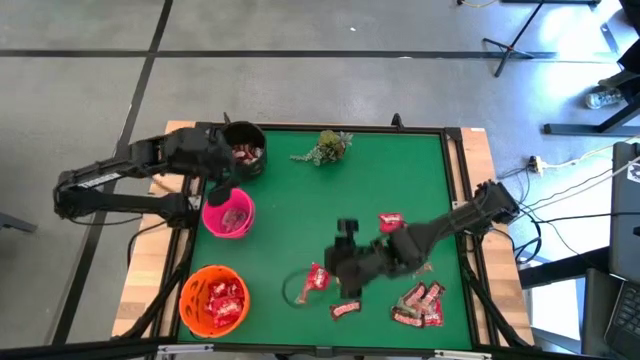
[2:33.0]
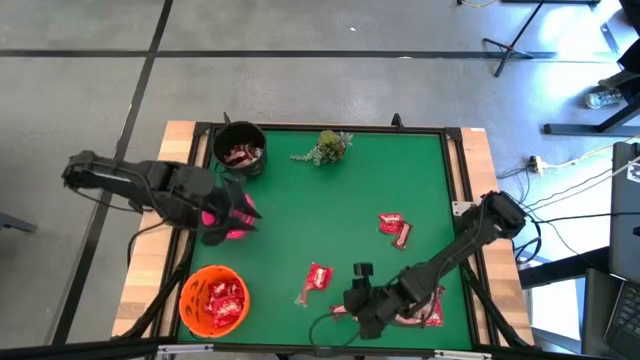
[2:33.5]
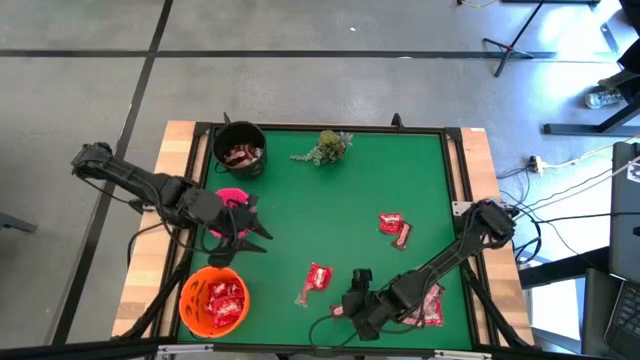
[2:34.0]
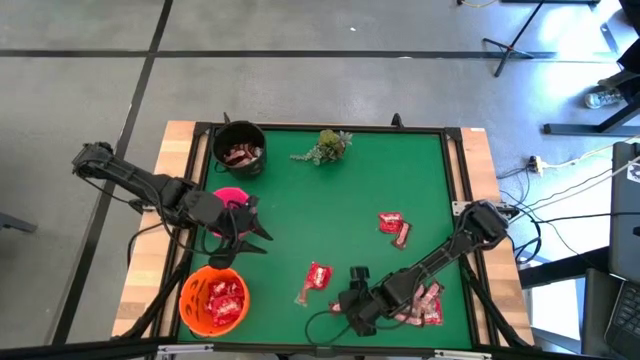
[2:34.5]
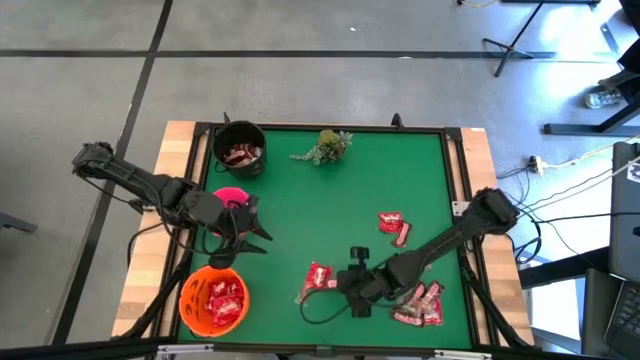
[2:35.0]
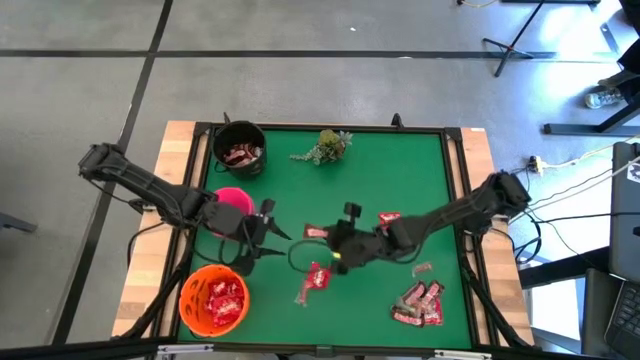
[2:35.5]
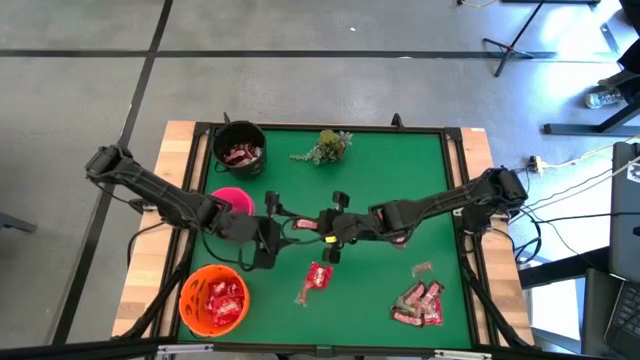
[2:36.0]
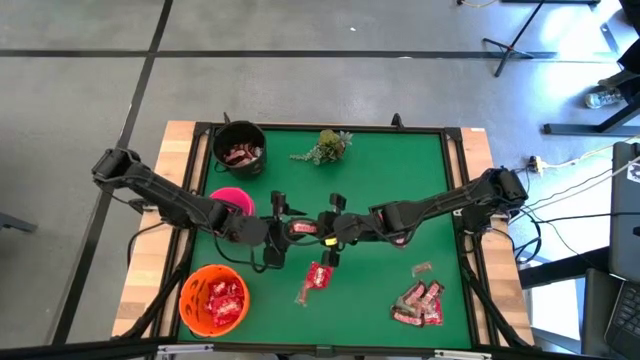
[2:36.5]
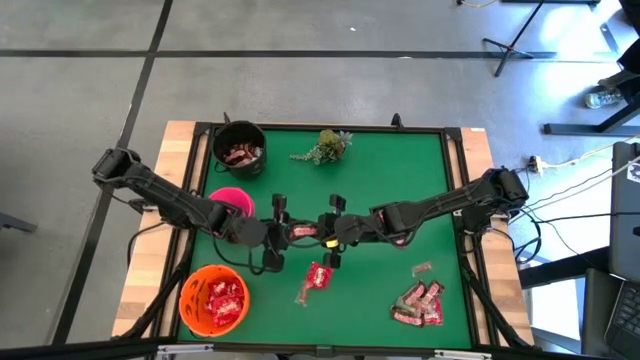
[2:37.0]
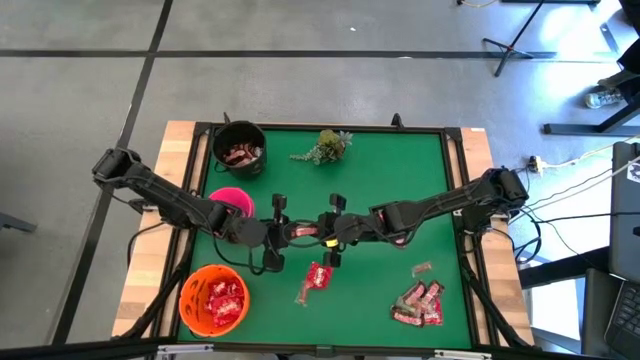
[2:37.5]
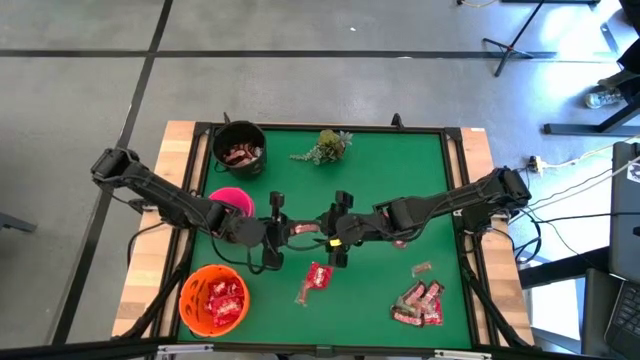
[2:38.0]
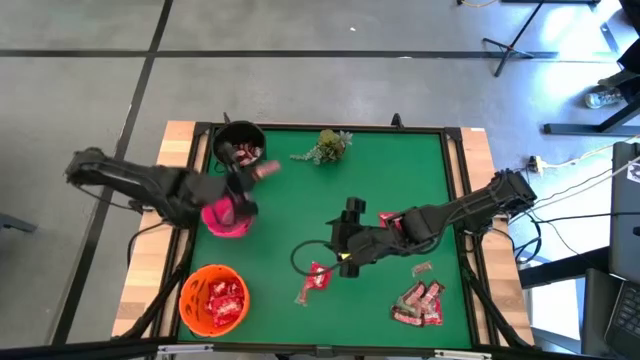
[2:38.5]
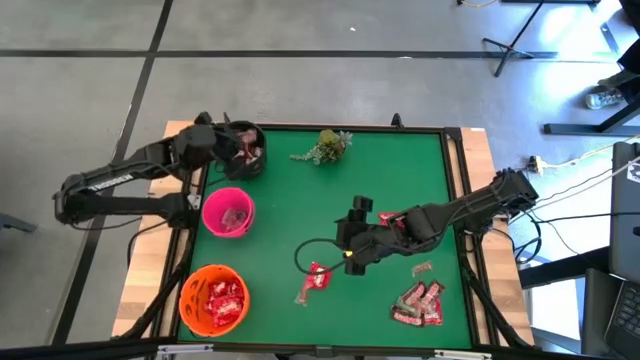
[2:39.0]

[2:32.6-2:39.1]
Task: Sort candy
Put the brown chocolate into the black bucket

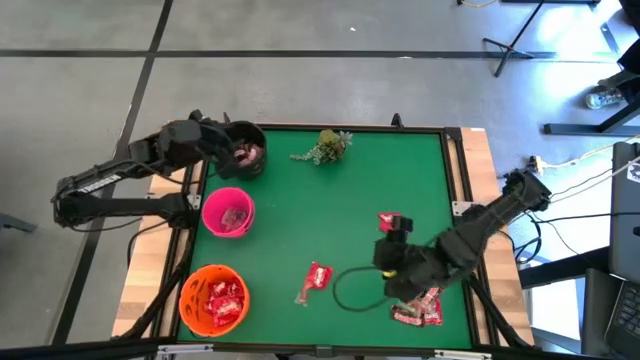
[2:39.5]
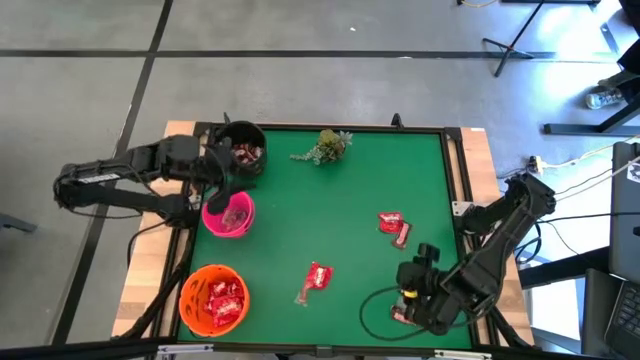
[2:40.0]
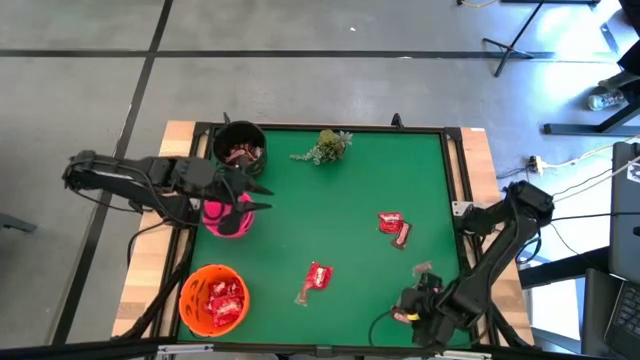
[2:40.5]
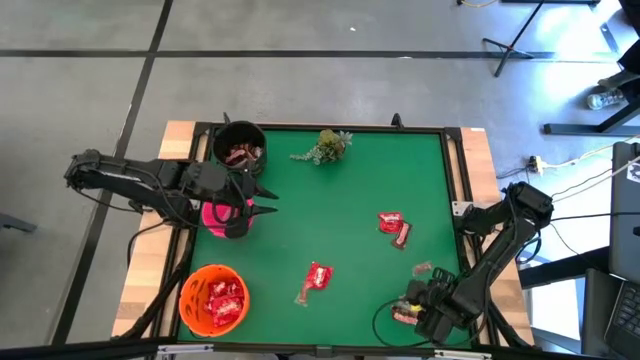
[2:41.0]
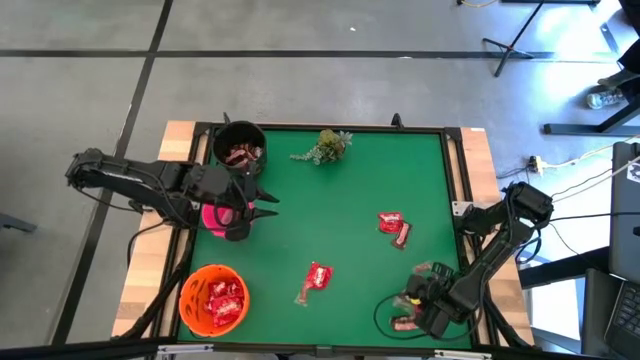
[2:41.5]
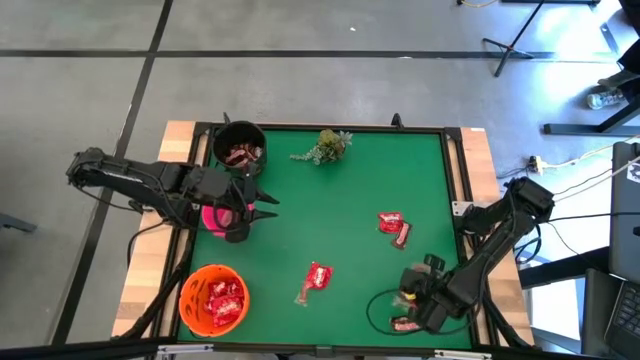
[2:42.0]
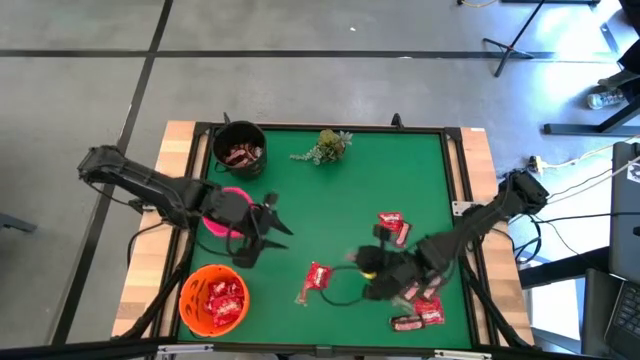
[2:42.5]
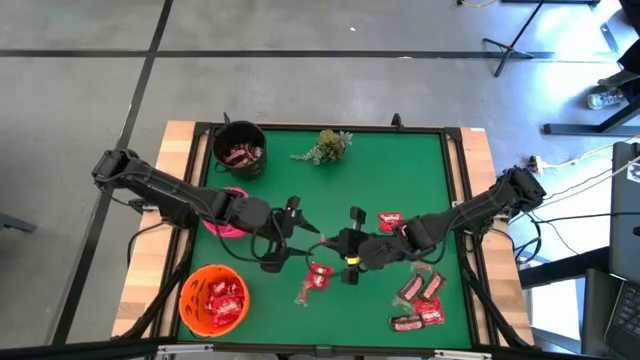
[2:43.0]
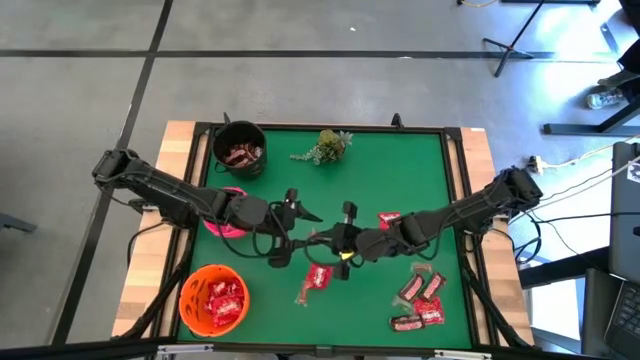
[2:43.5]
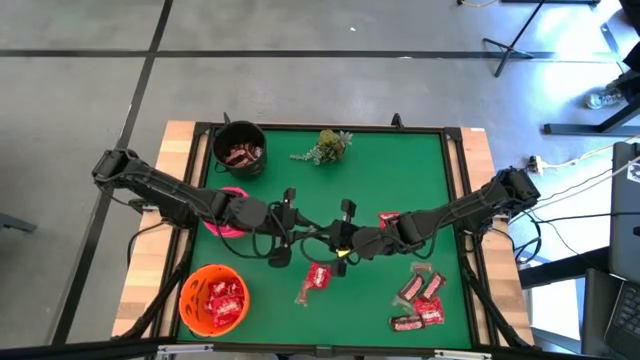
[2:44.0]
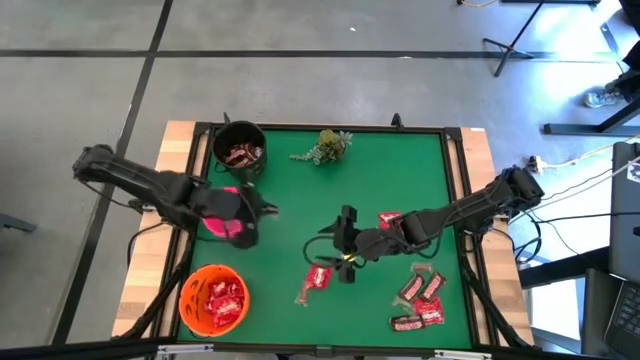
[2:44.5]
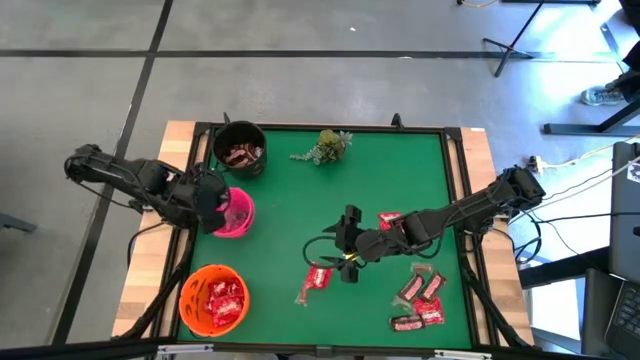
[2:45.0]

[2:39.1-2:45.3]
Put the orange gummy into the pink bucket

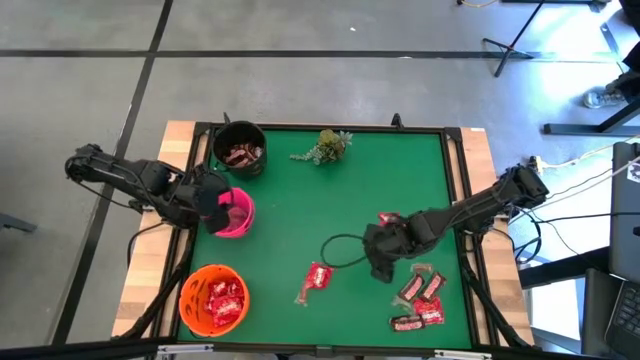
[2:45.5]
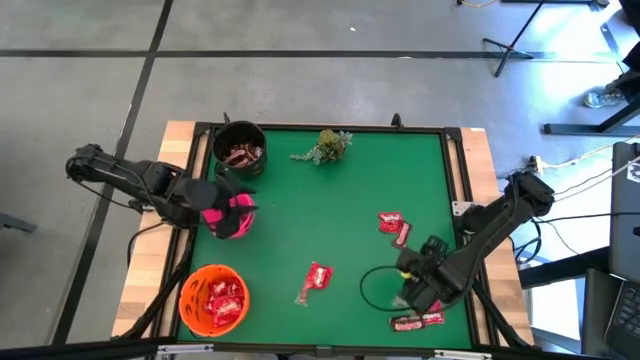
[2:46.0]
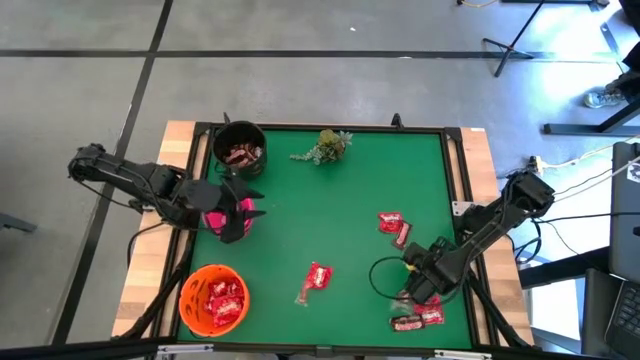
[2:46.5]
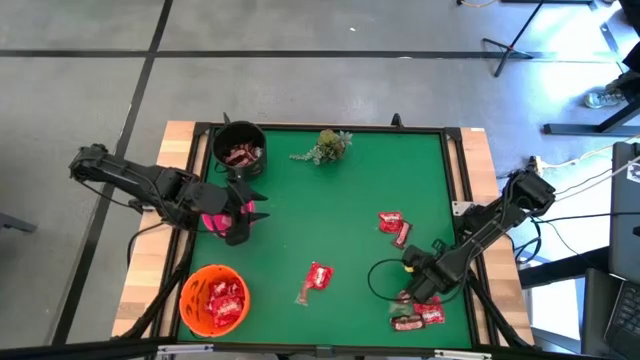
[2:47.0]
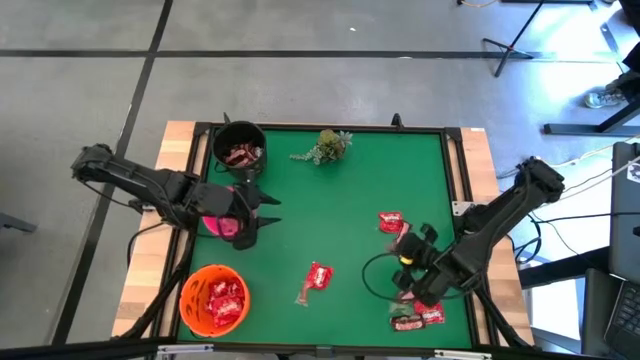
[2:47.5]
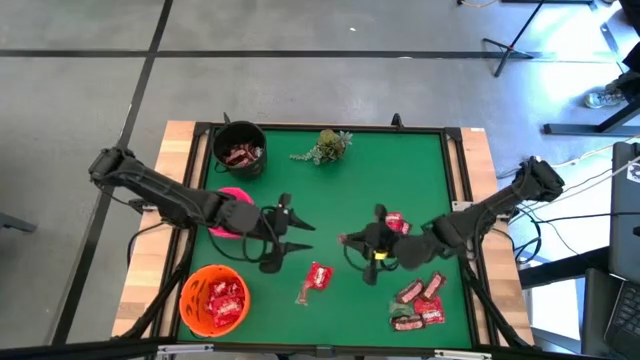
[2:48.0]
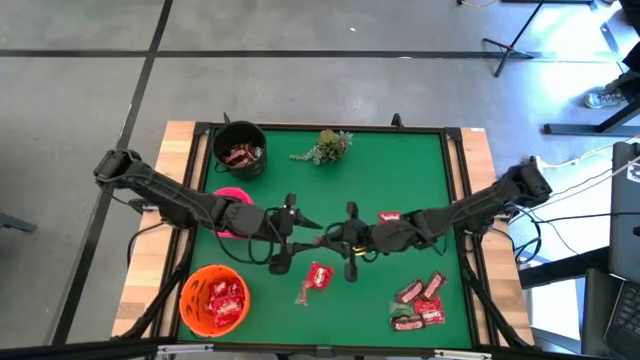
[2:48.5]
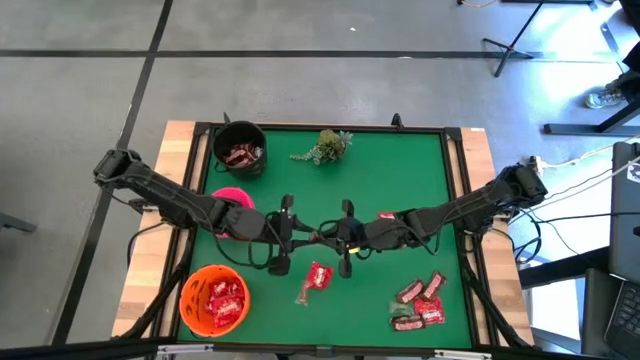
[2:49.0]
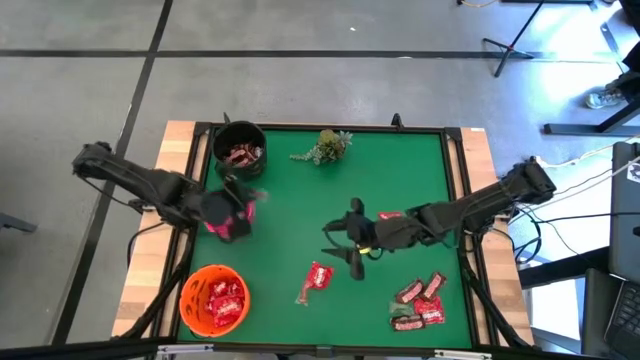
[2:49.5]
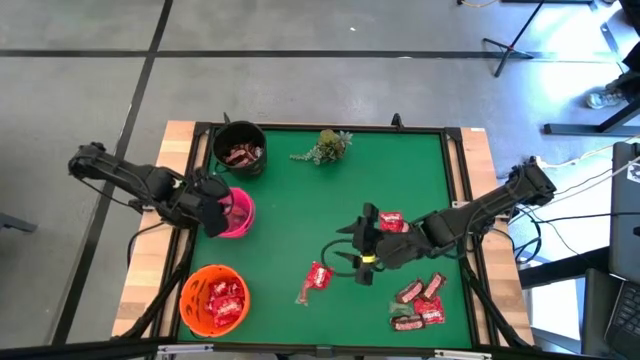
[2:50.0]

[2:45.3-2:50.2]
Put the orange gummy into the pink bucket

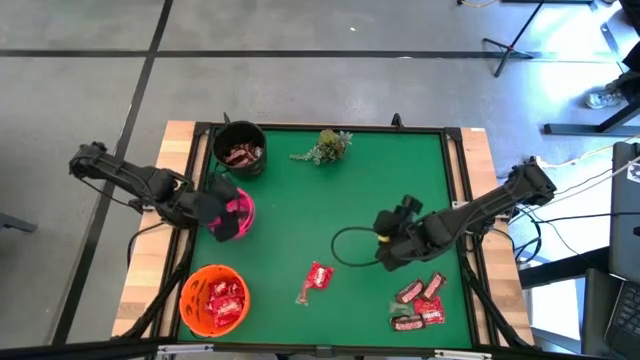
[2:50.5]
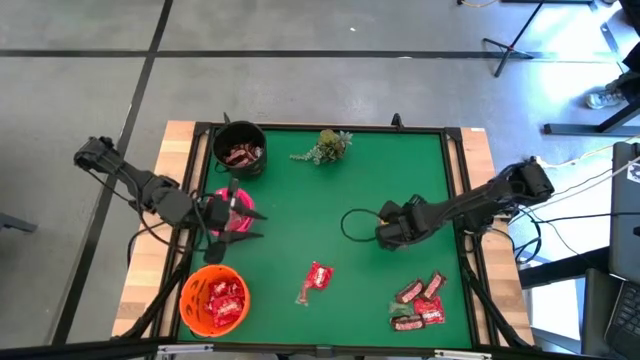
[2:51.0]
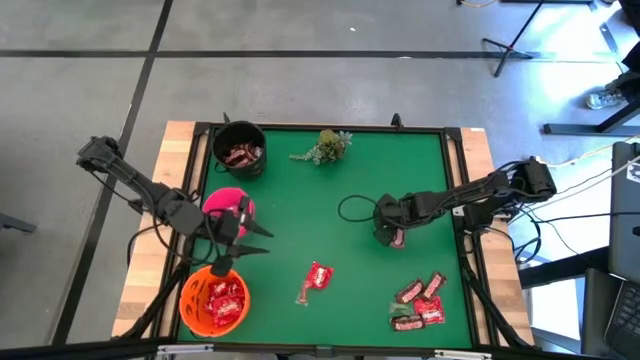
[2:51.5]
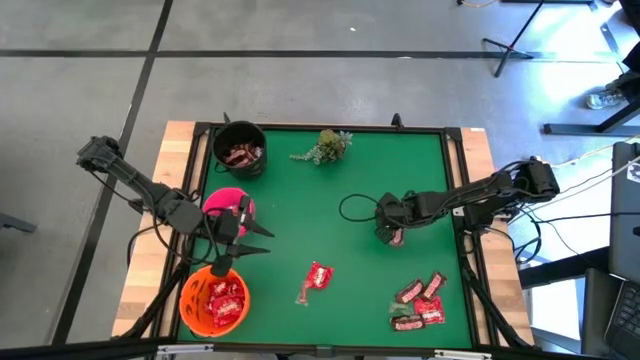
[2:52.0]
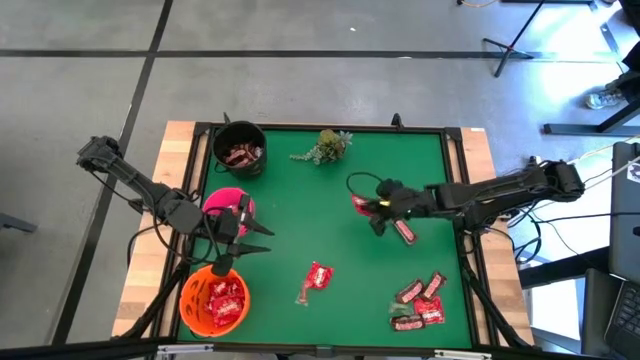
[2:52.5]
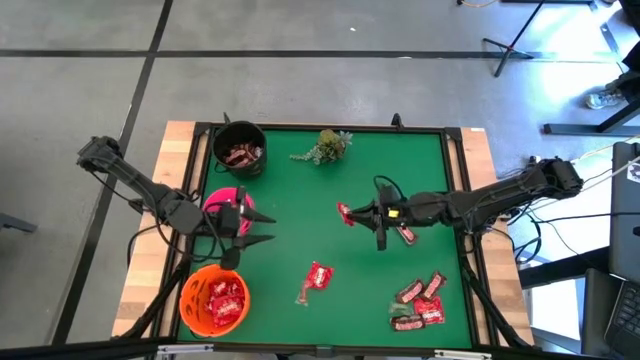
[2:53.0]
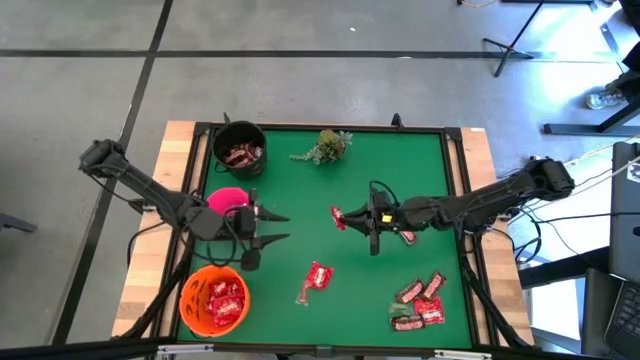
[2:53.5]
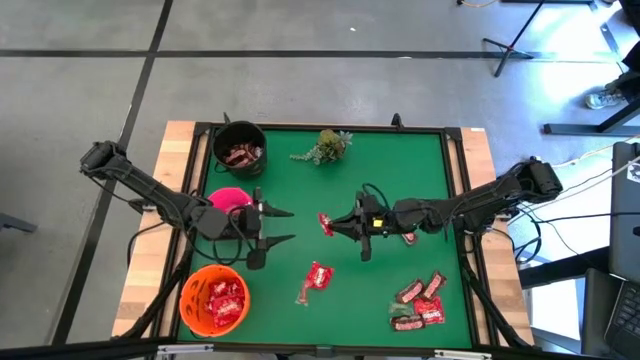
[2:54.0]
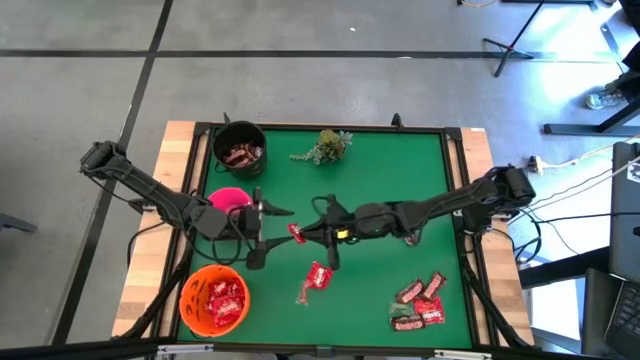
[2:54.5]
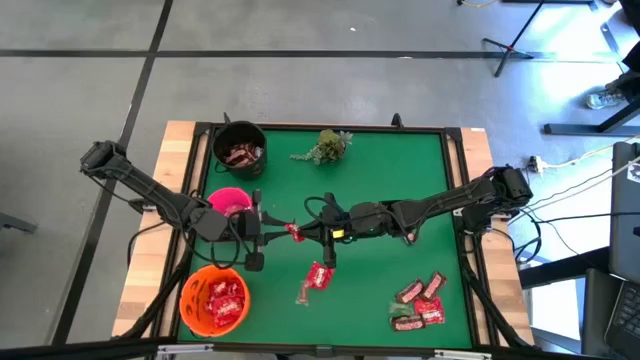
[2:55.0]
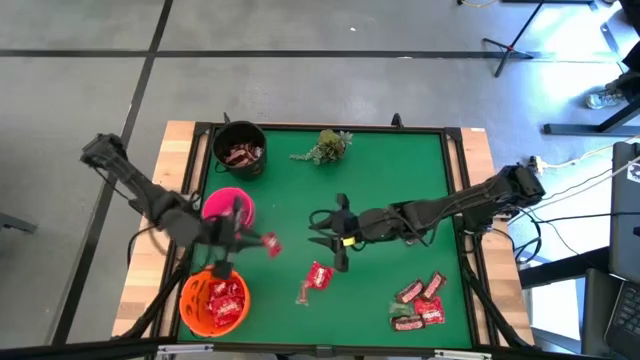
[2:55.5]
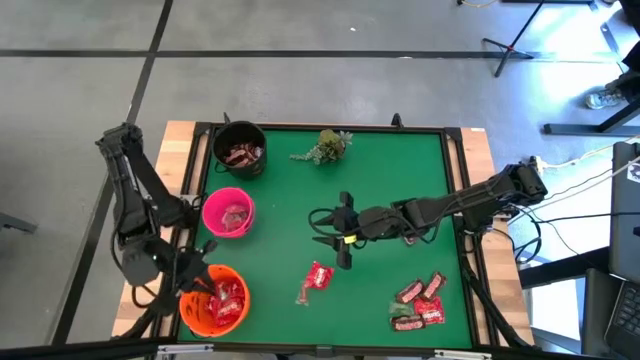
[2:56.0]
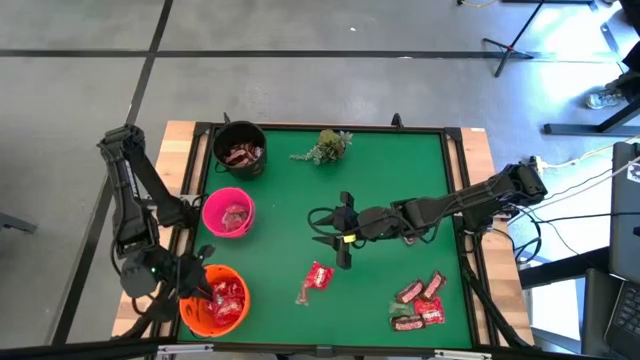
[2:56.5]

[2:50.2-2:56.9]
Put the red candy into the orange bucket
